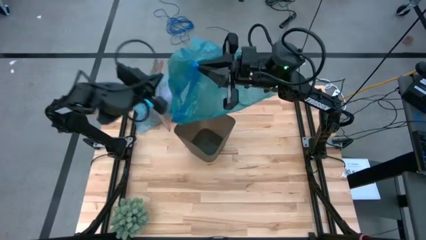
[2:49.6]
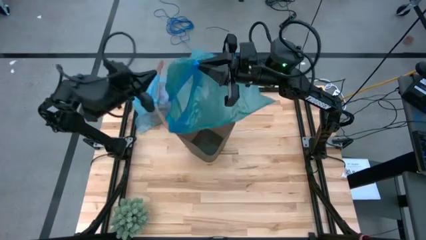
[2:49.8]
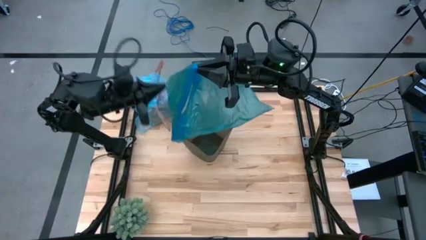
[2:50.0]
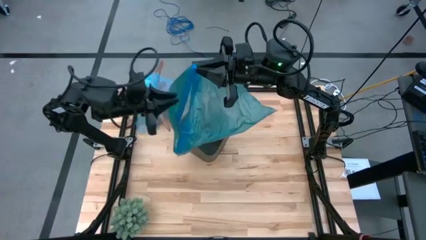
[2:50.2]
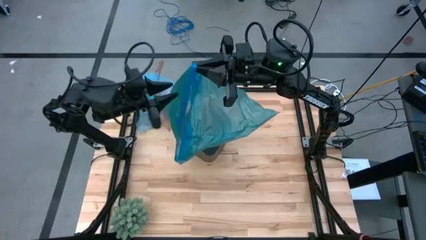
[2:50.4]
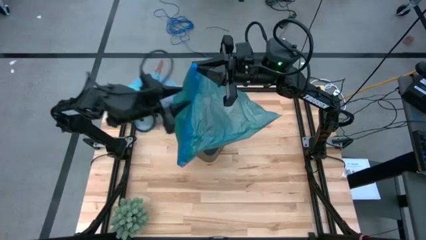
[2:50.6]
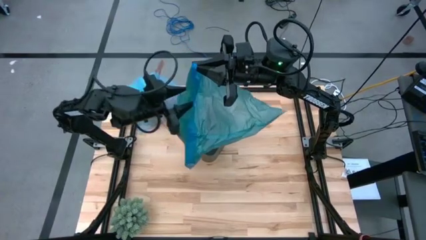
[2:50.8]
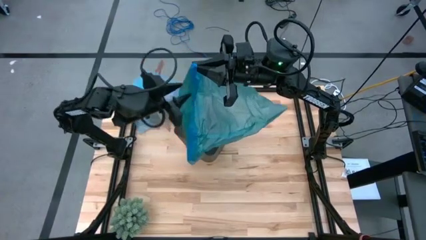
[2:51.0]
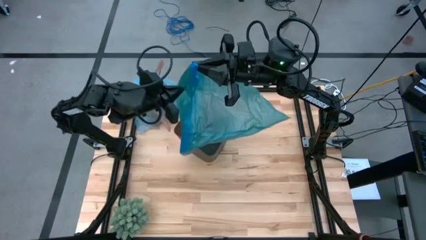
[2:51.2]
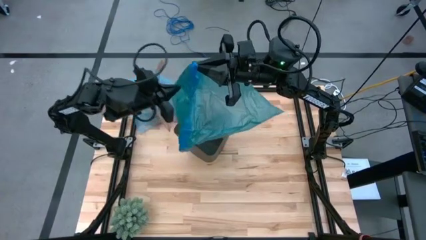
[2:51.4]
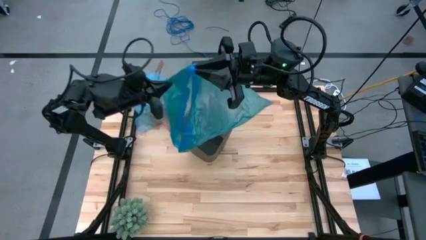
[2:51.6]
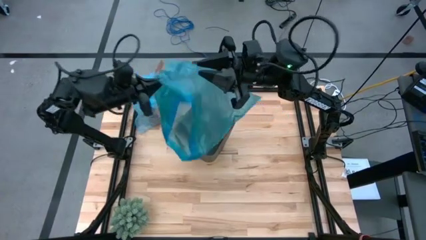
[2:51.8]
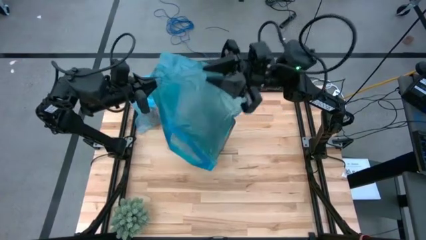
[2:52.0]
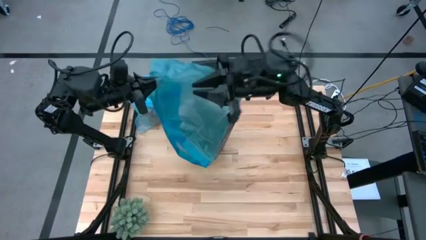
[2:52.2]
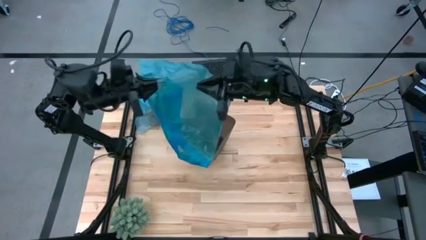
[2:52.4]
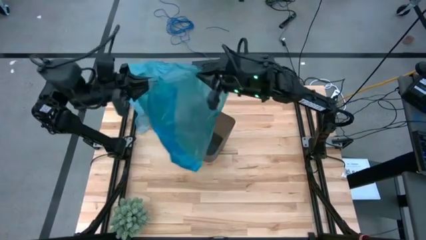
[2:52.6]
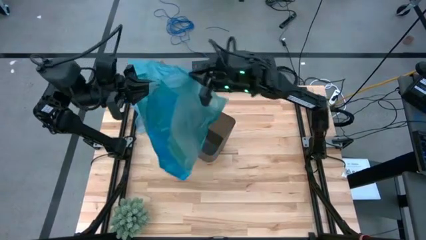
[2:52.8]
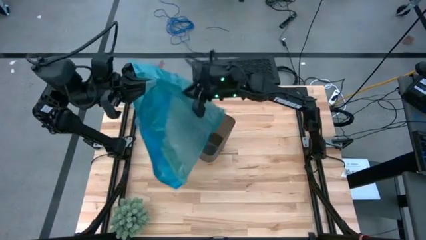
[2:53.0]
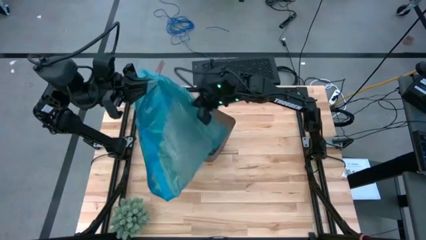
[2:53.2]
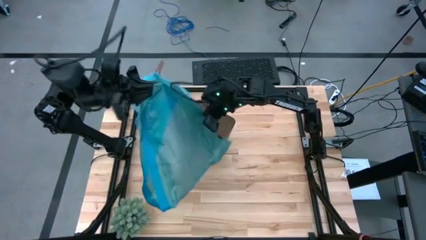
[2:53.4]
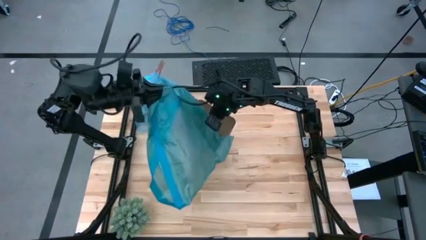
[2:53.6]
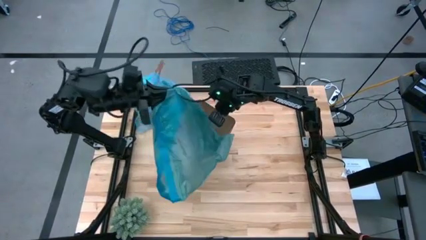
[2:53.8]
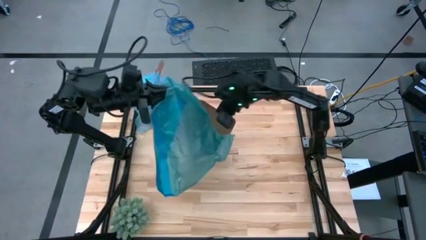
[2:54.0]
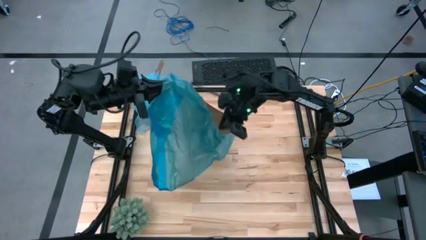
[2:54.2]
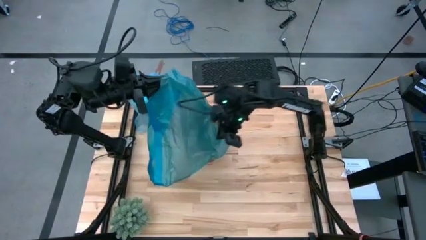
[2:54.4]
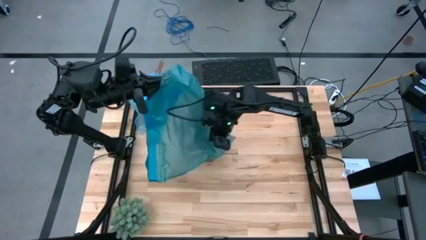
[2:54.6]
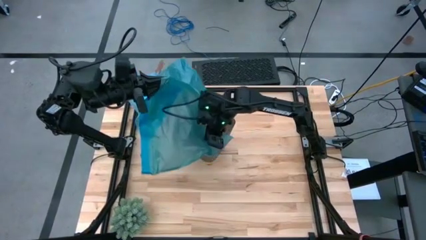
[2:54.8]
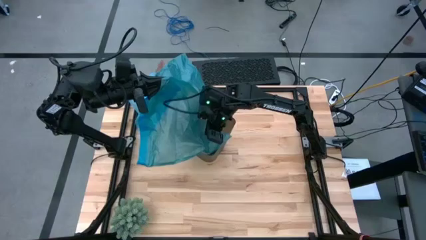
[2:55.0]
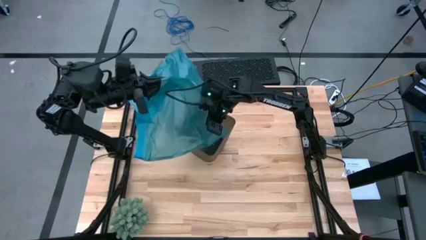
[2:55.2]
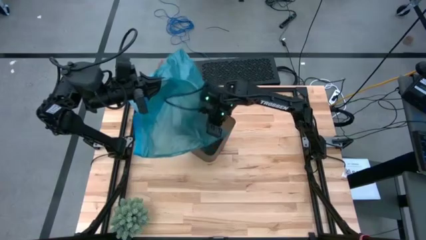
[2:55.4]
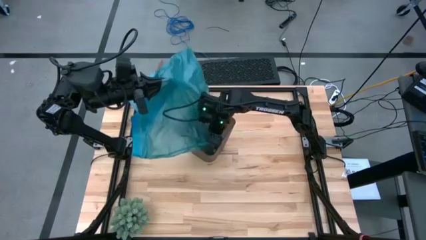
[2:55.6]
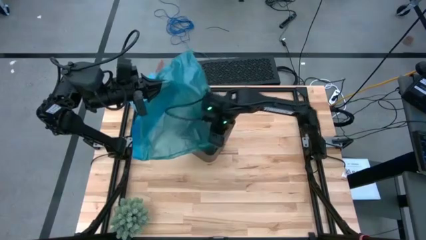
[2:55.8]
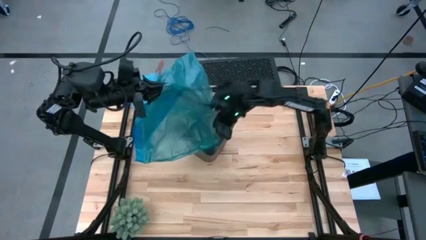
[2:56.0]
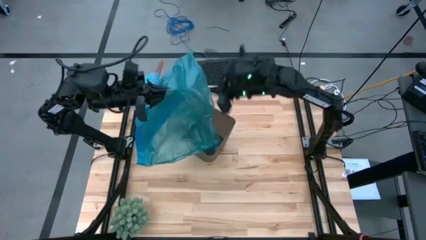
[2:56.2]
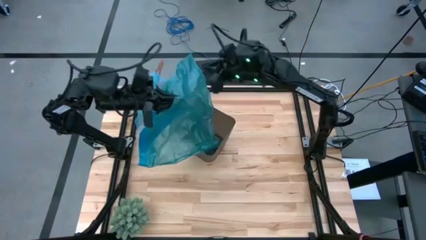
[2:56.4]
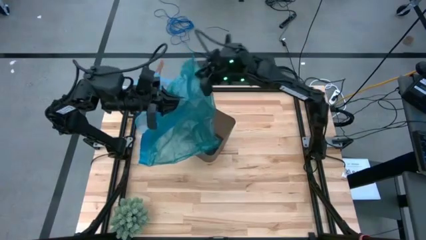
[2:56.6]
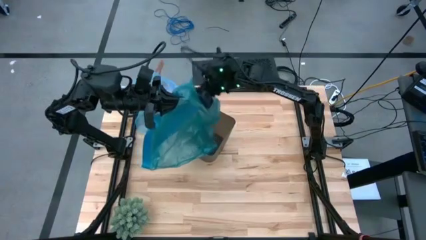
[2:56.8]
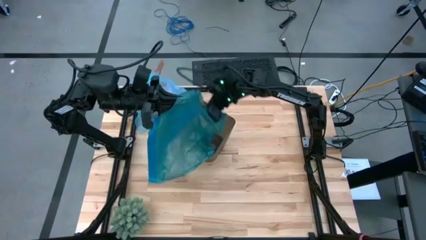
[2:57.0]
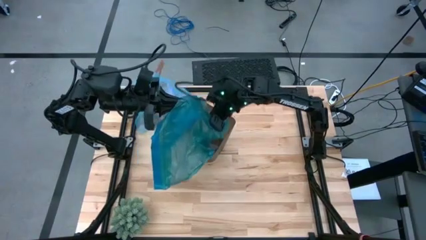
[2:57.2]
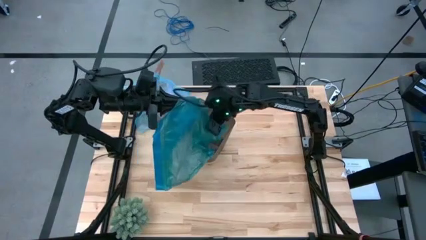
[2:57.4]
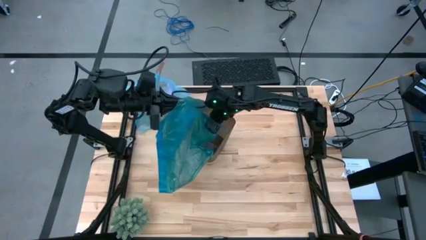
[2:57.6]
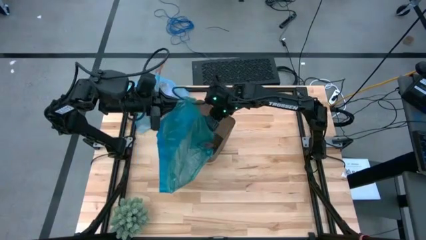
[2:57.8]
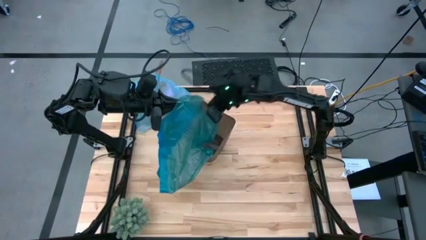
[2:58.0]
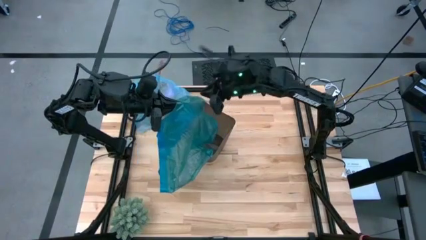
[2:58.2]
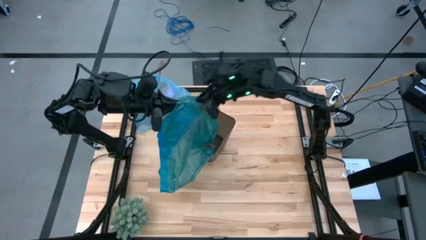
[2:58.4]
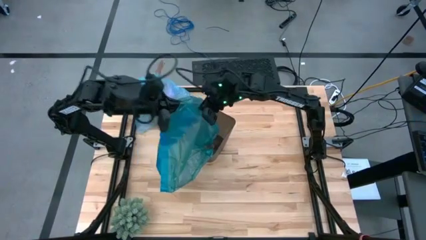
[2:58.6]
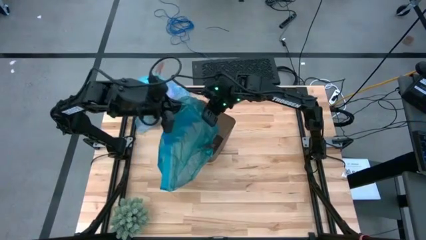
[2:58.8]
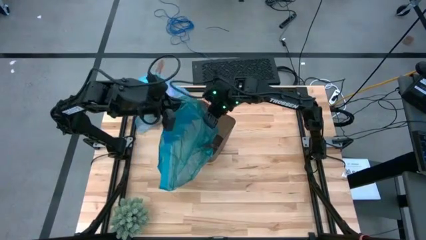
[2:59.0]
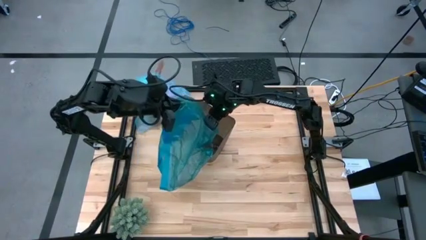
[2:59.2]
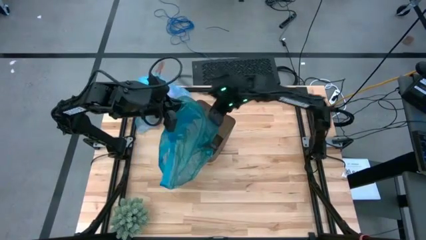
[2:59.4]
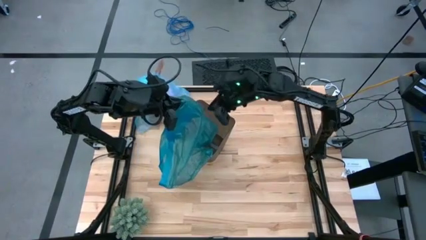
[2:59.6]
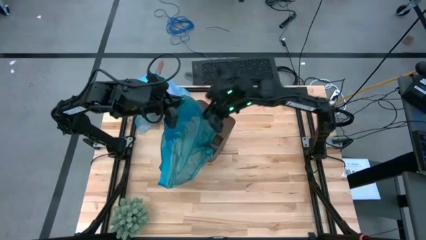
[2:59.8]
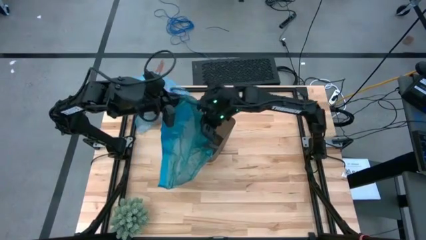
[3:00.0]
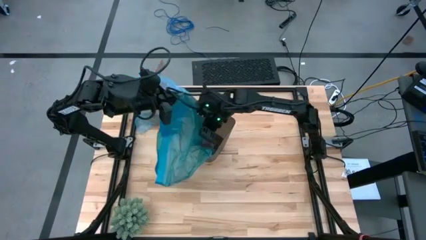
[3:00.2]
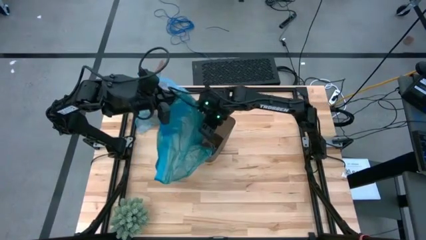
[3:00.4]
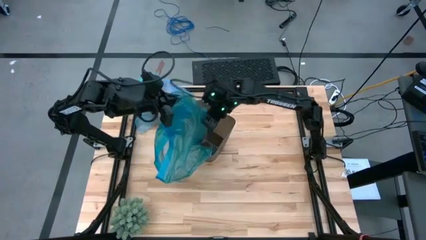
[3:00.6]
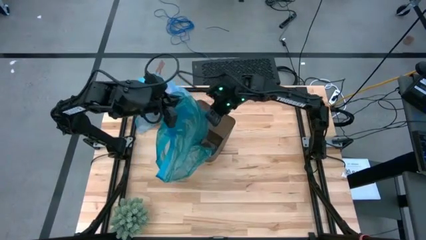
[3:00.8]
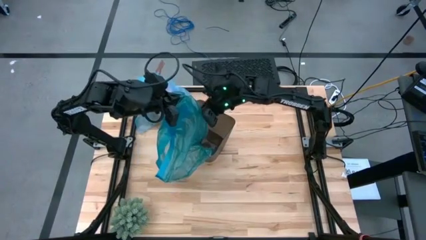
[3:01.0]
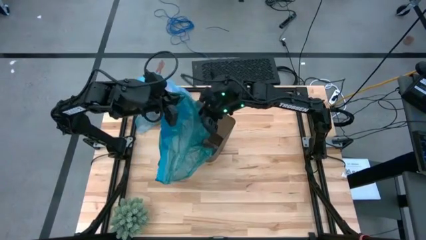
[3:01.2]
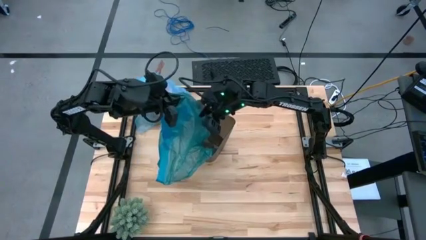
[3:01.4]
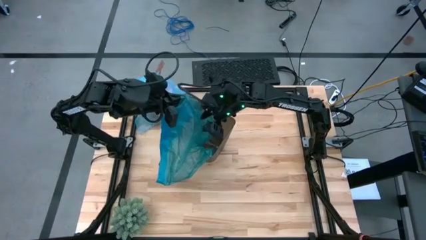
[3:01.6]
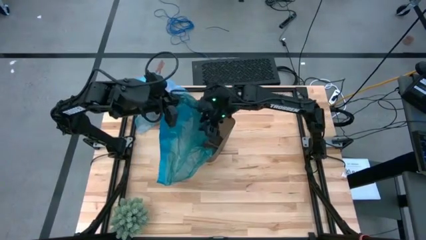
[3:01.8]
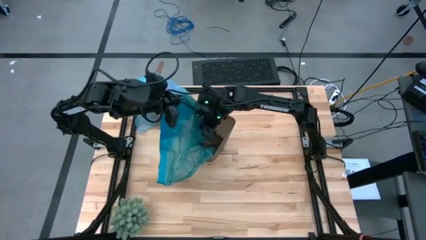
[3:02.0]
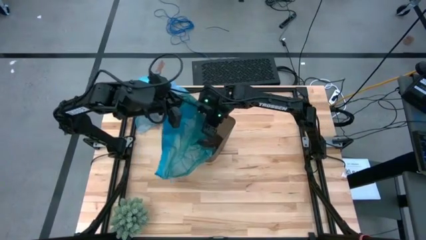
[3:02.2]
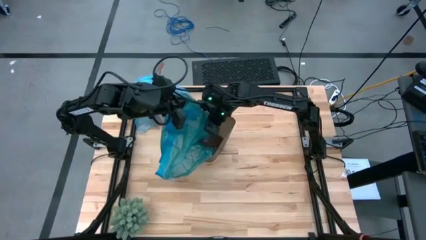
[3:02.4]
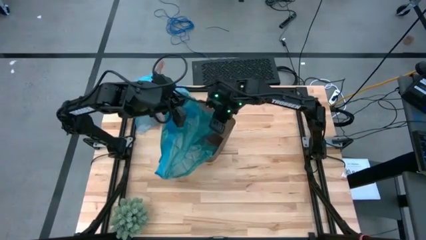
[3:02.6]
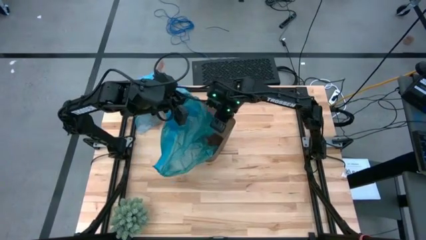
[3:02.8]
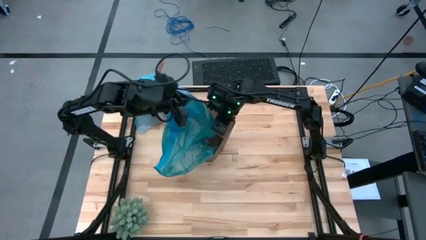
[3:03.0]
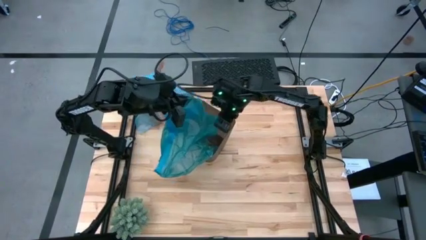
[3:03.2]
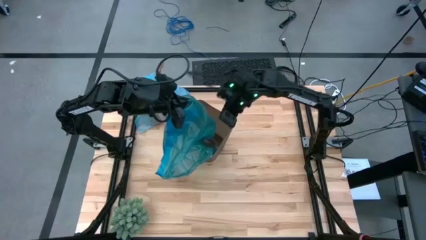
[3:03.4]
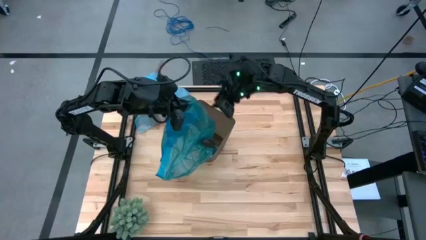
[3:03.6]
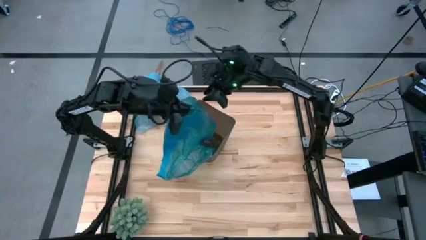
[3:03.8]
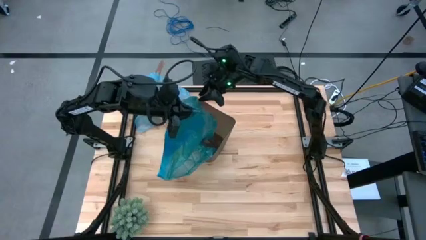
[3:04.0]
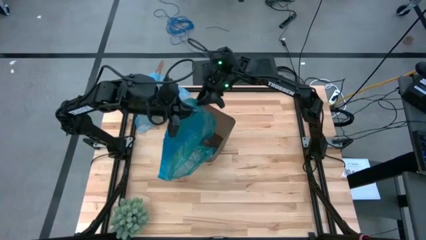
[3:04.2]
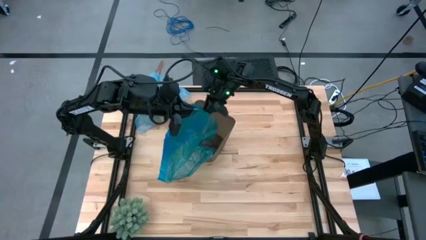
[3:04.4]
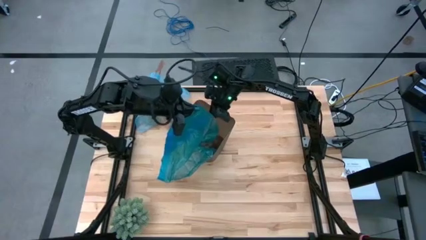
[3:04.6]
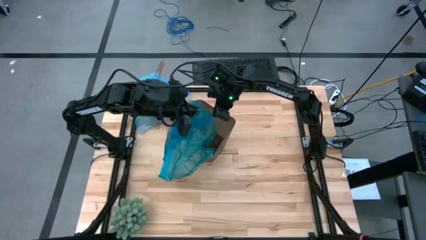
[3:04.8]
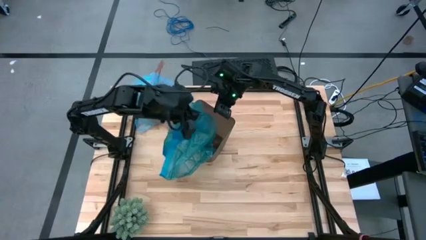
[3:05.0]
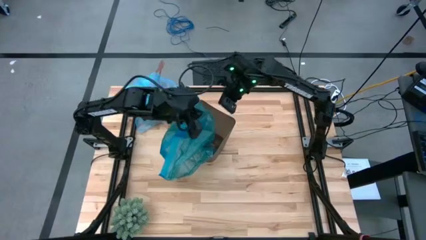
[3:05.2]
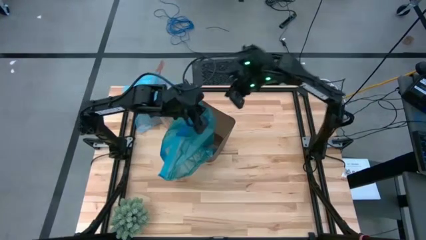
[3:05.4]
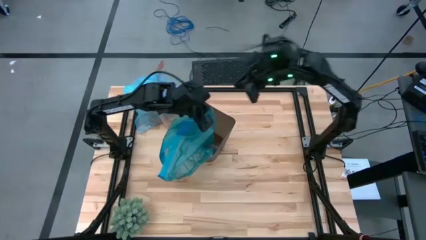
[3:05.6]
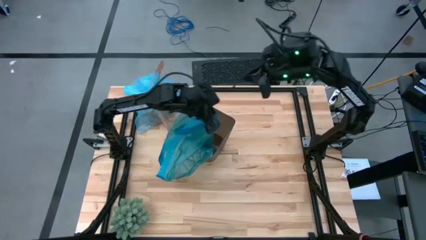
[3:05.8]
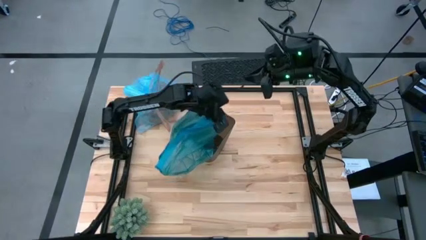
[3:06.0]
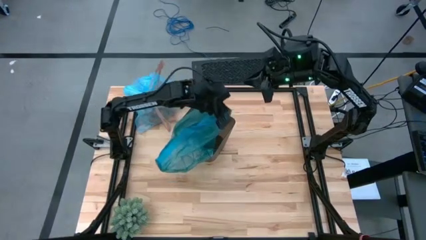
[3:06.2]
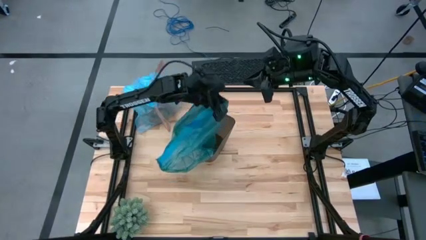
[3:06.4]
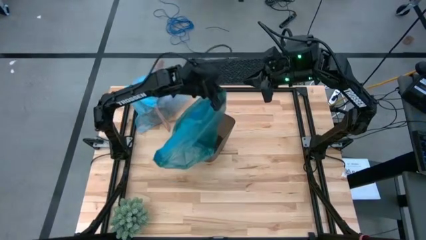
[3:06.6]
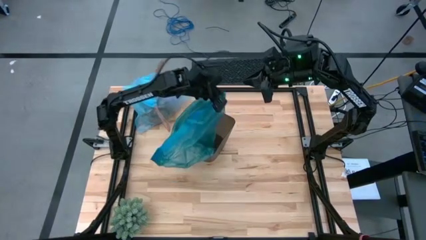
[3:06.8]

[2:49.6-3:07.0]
Task: place trash/remove bag and relplace
Insert the blue trash bag into the black trash bin
